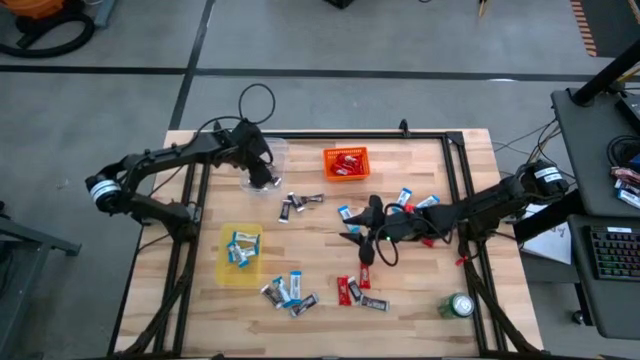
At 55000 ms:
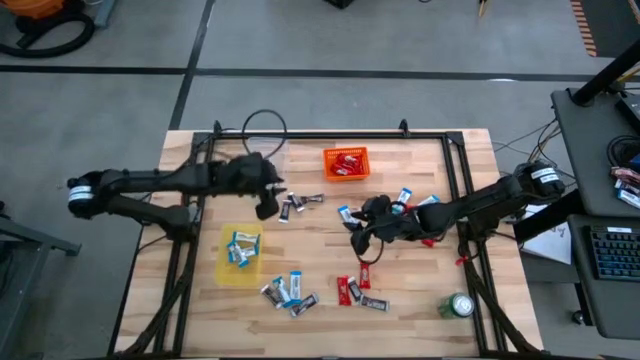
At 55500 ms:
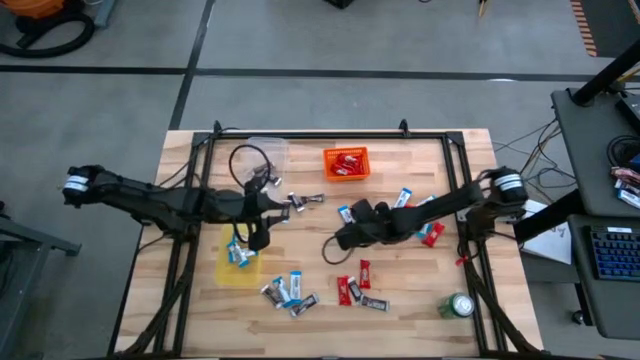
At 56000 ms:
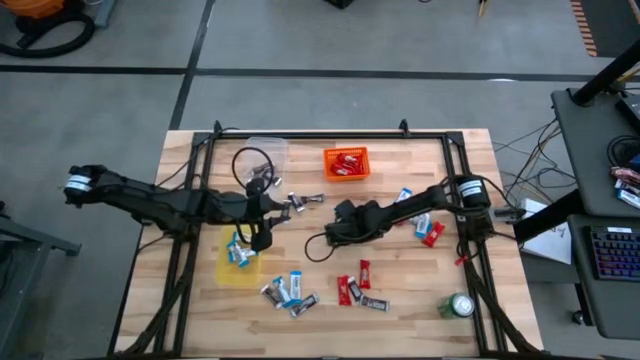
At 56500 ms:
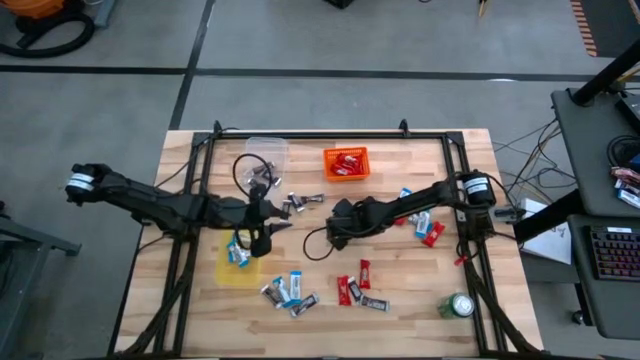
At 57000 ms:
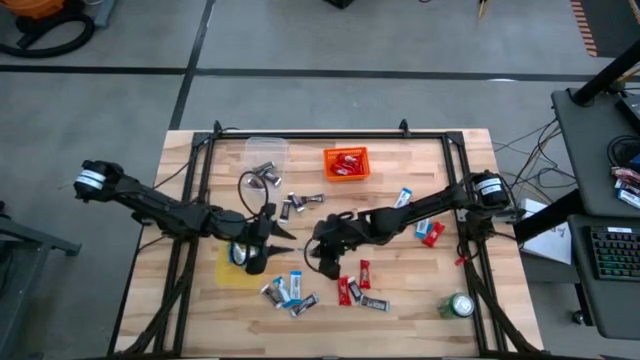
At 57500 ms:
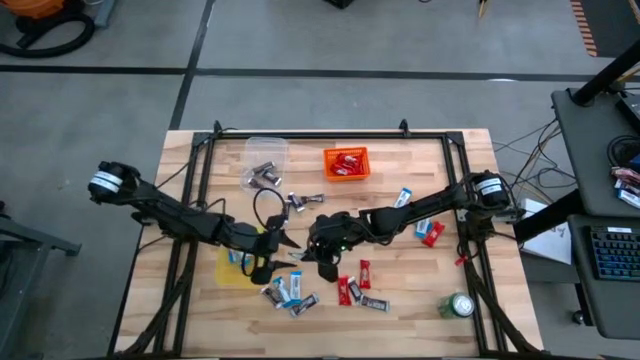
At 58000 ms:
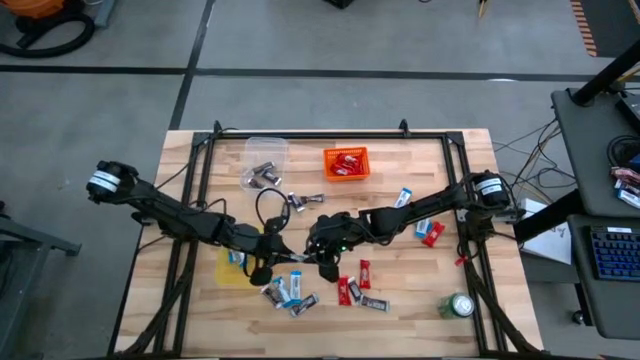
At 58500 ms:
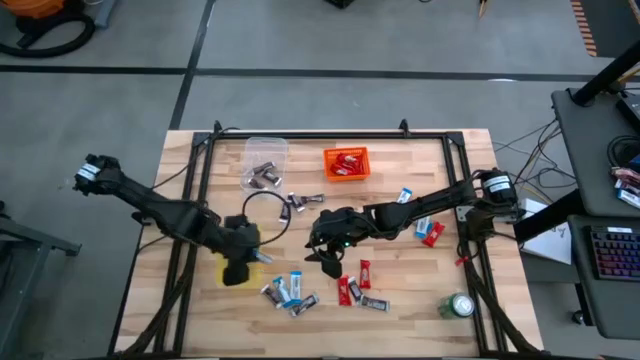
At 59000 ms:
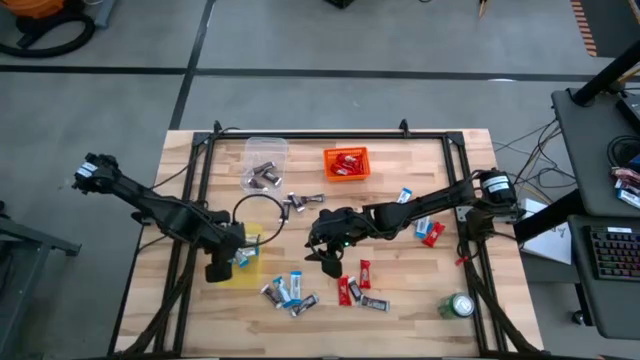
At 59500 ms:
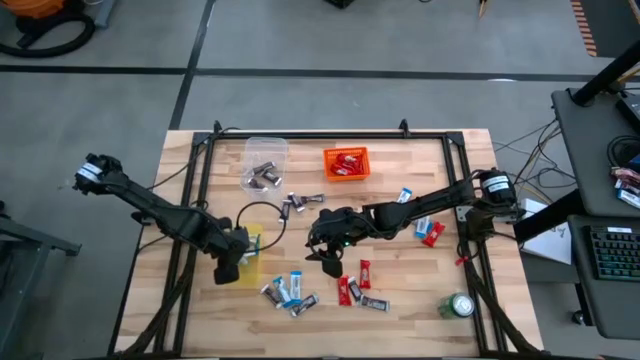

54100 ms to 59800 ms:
Task: Sort candy
Put the center white candy into the yellow bin

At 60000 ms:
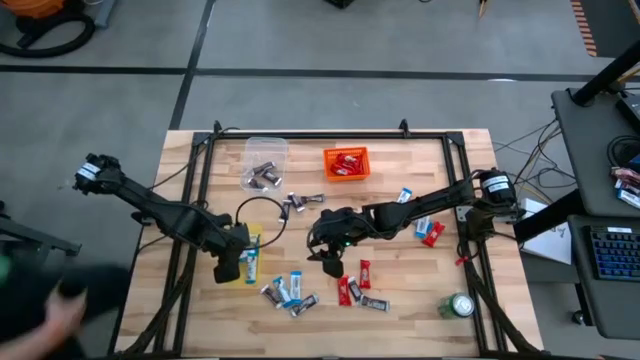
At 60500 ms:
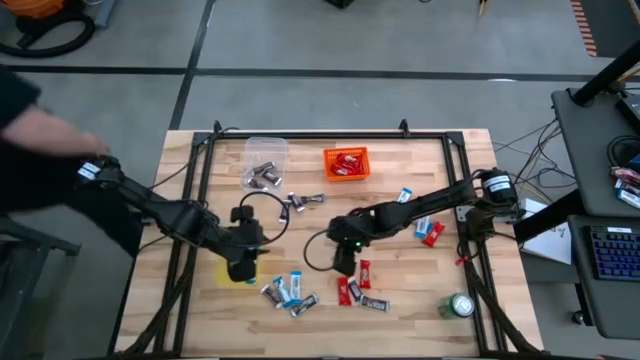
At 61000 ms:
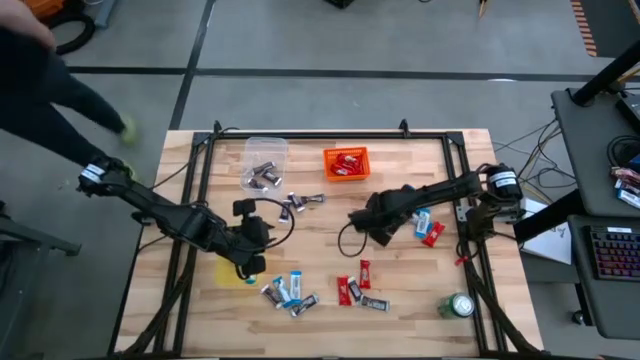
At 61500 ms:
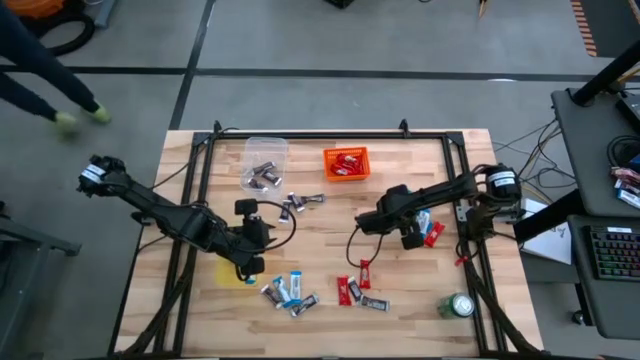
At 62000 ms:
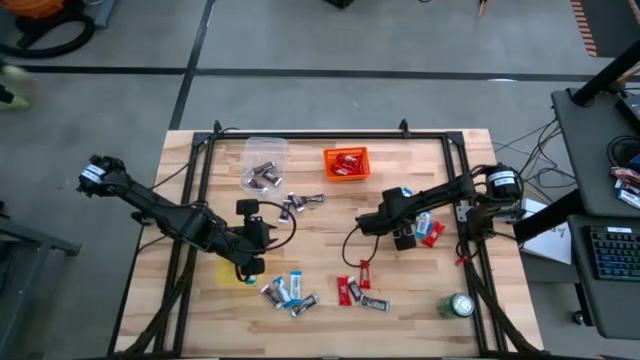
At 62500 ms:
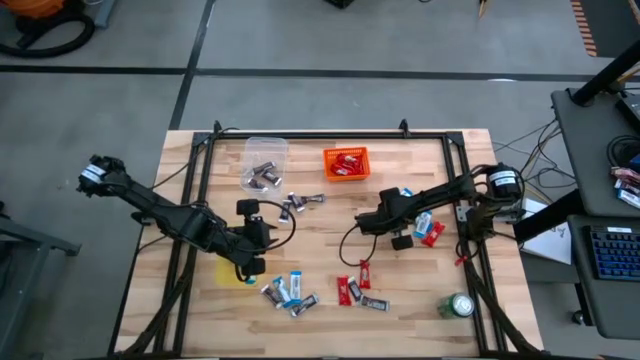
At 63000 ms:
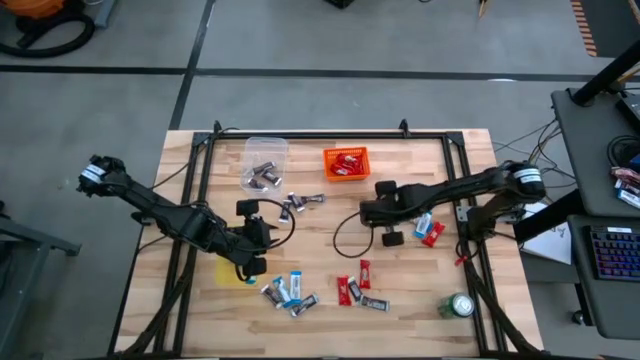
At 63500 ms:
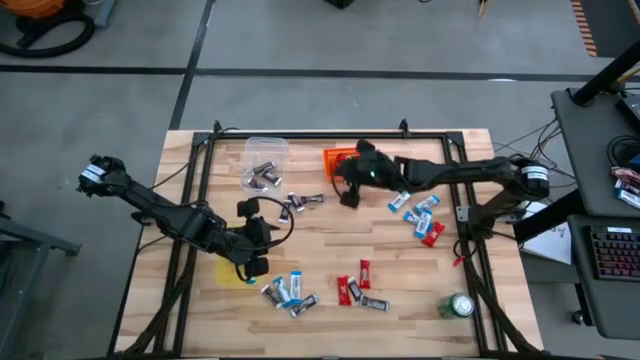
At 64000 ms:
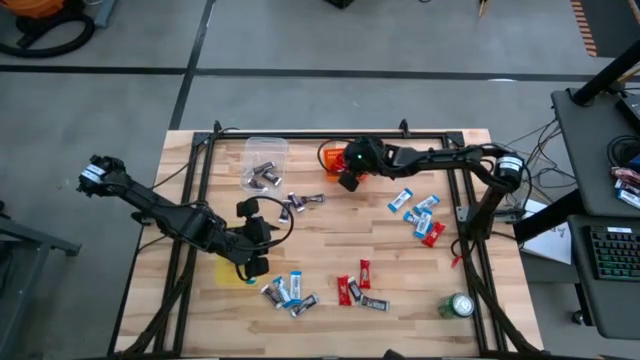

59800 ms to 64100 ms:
Put the middle right red candy into the orange basket

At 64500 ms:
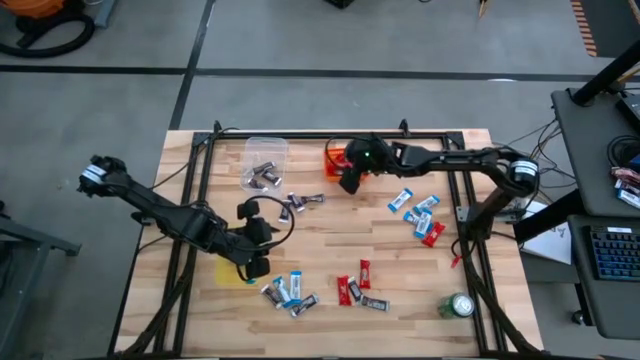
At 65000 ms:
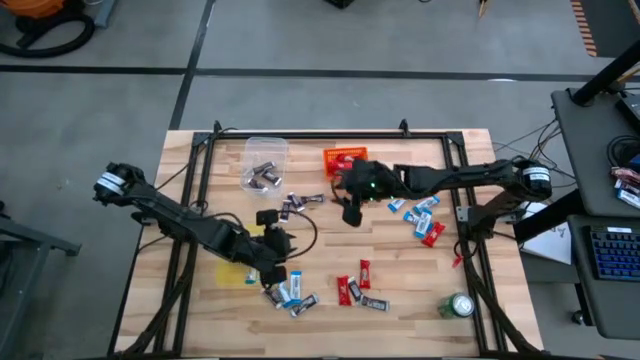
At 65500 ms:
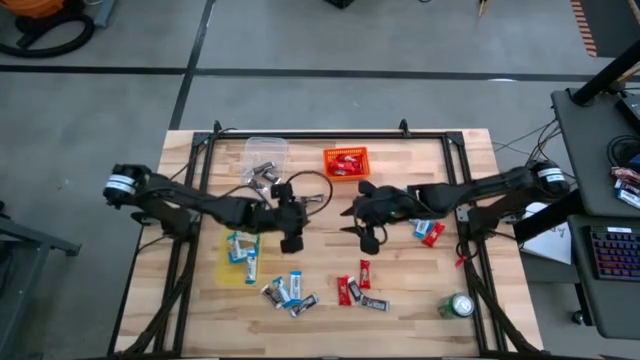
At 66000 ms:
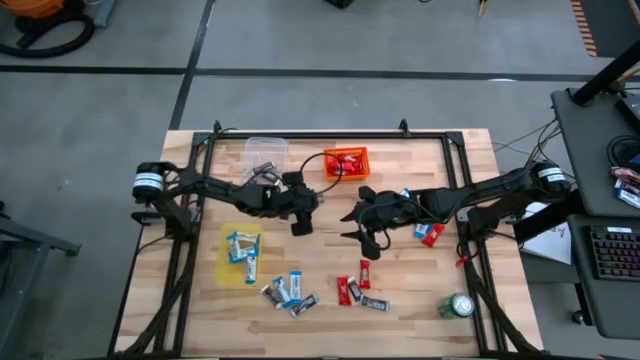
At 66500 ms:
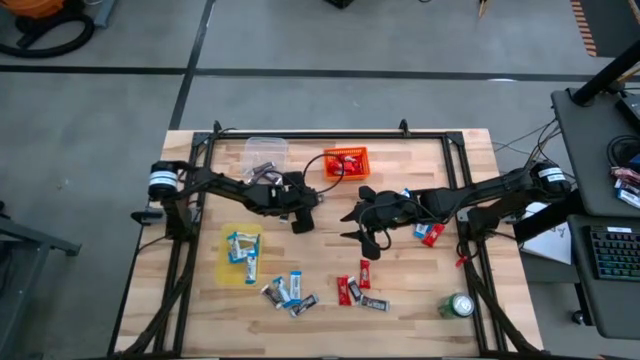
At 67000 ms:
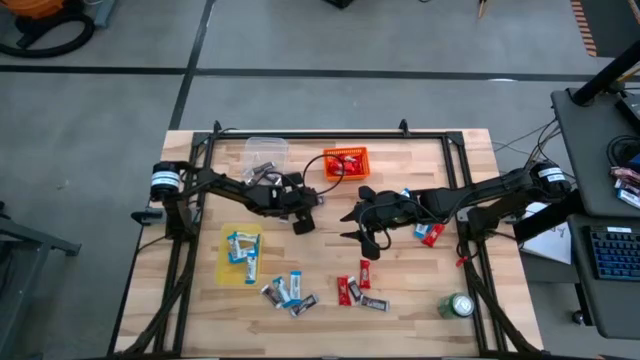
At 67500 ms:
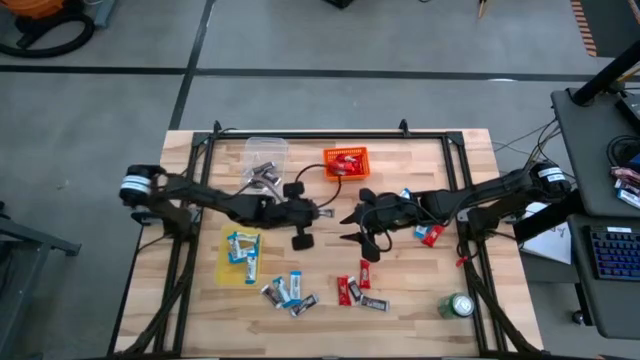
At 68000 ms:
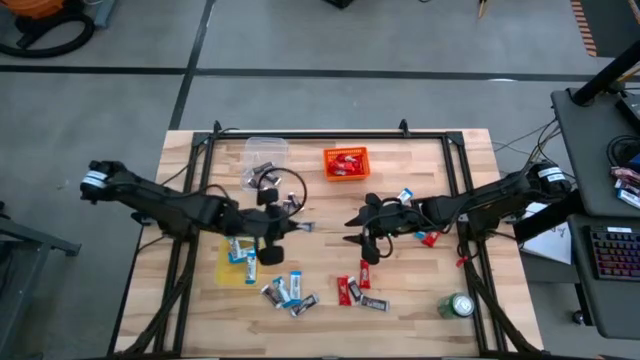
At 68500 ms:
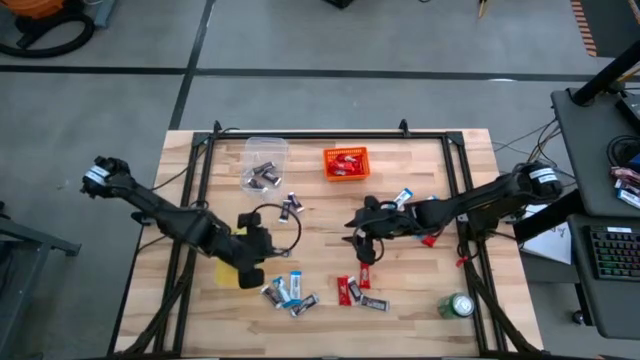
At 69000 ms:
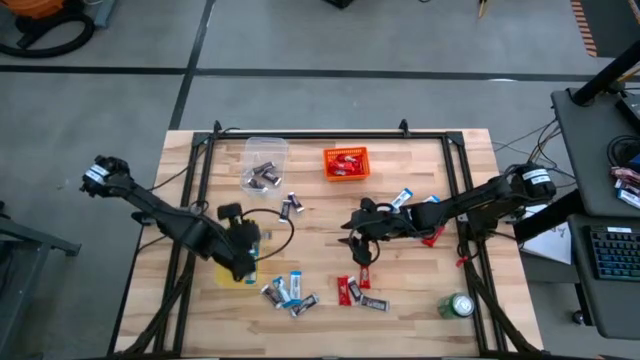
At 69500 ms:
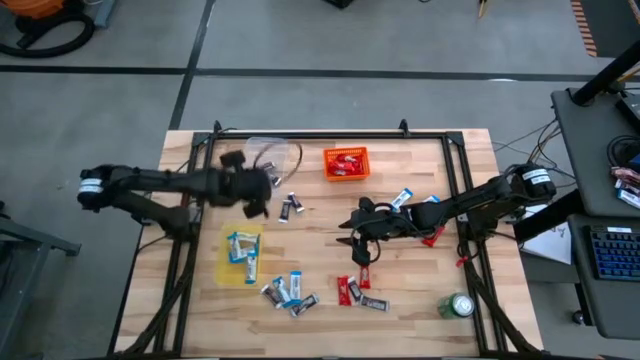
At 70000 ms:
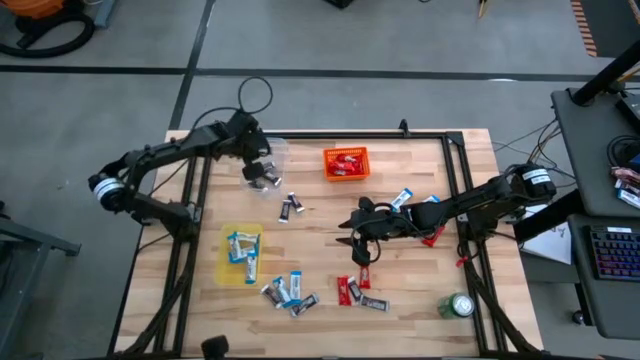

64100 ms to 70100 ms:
Put the middle left brown candy into the transparent bin

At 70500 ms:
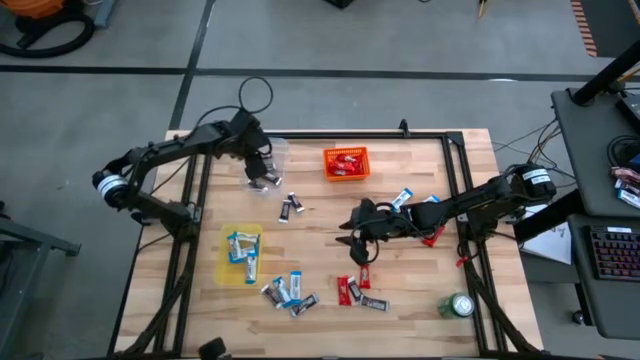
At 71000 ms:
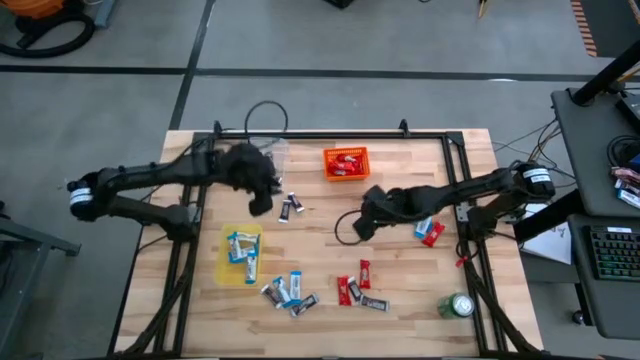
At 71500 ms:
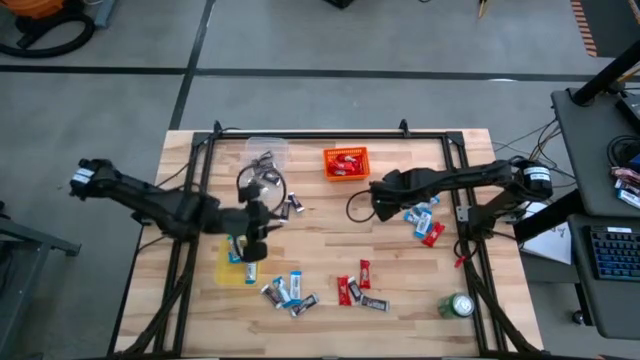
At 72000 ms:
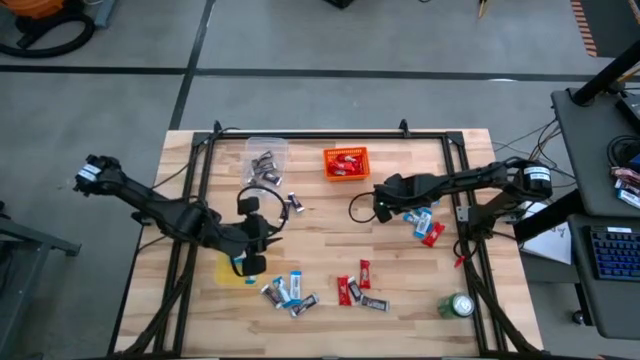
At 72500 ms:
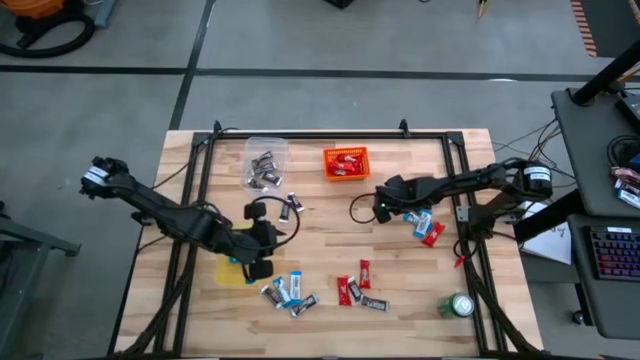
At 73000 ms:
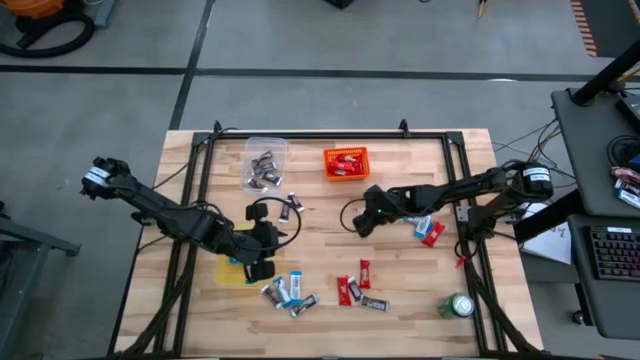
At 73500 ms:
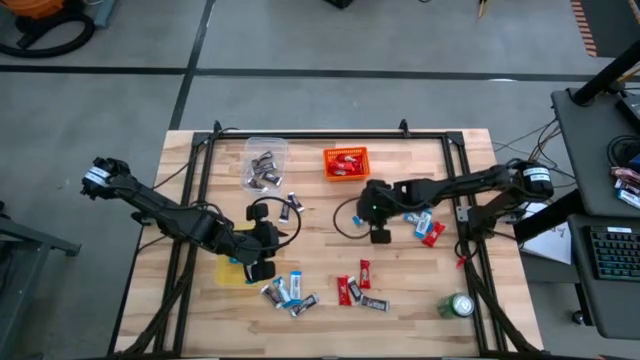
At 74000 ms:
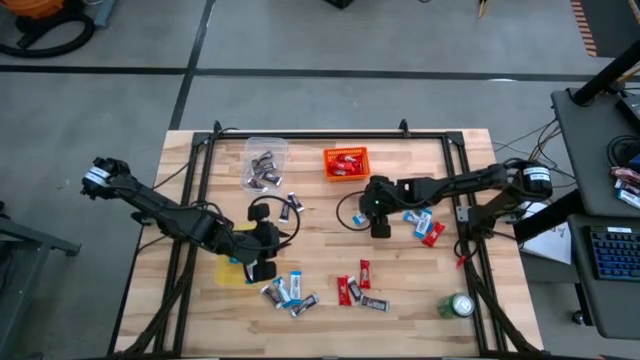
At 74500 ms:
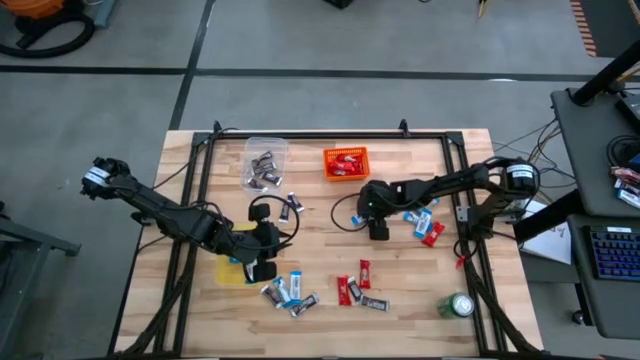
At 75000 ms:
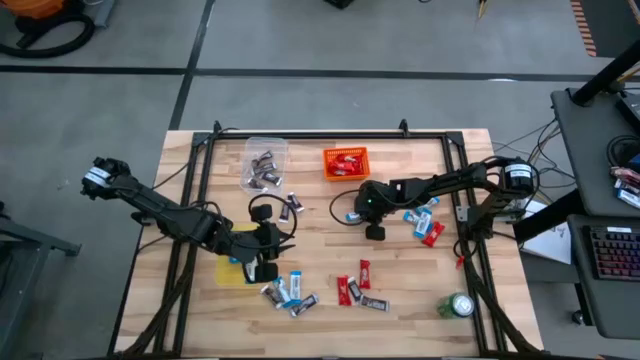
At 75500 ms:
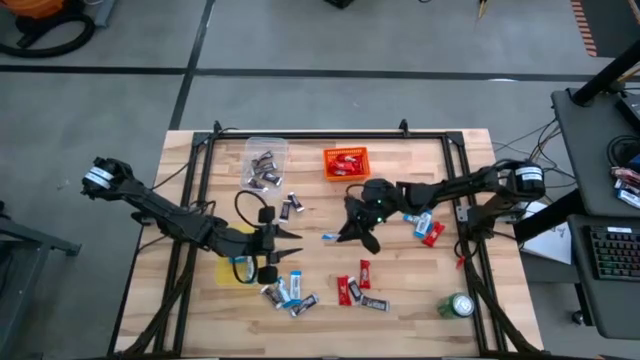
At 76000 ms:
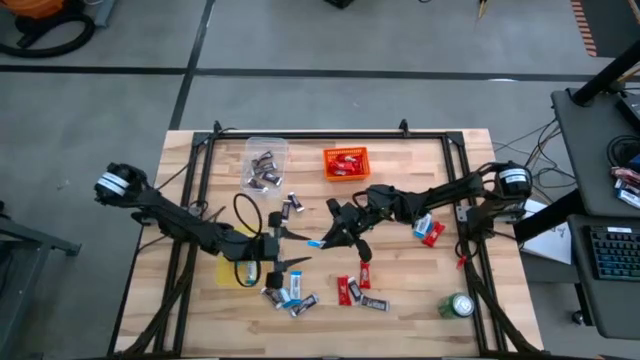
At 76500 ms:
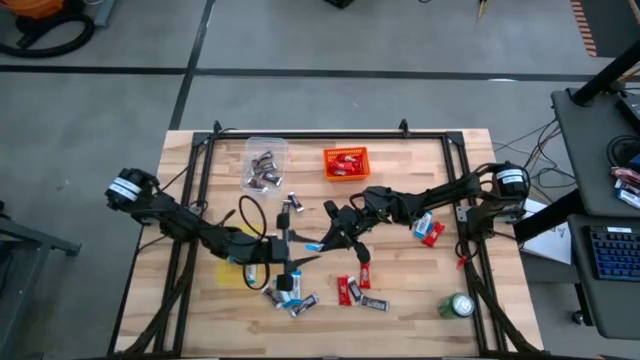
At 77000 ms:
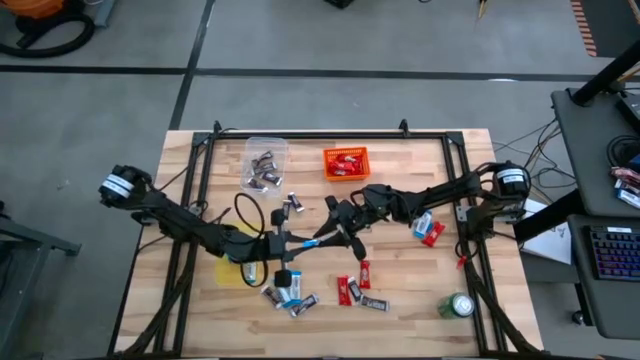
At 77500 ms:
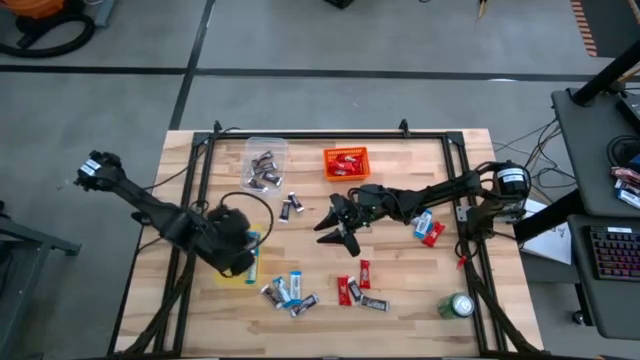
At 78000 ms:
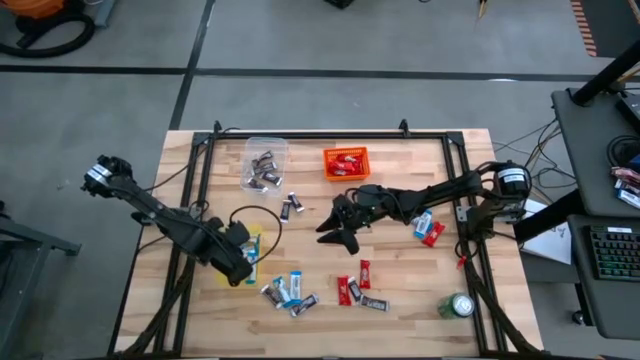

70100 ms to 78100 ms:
Put the middle right white candy into the yellow bin
